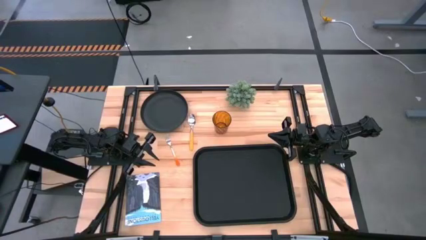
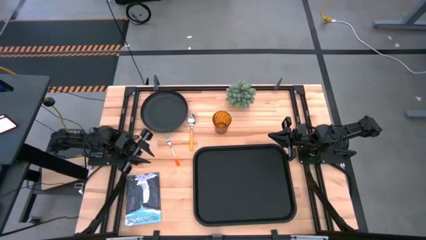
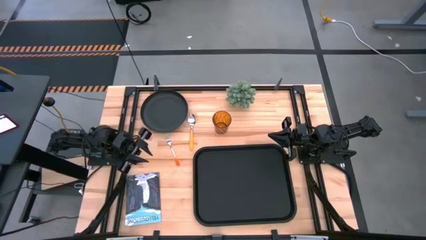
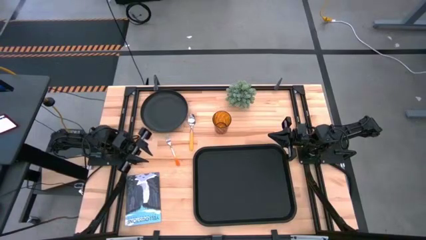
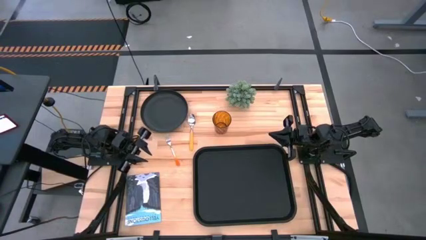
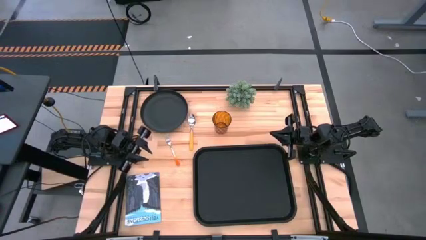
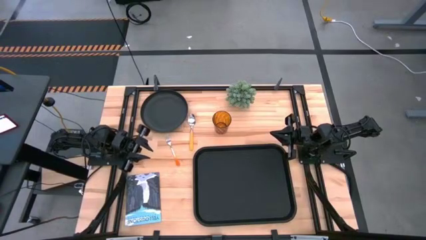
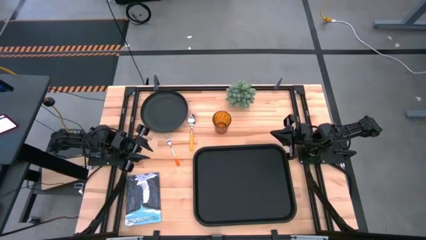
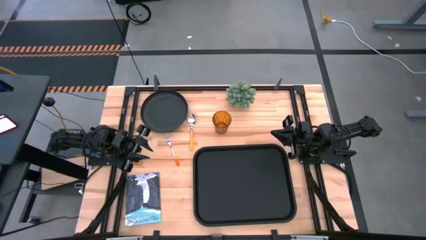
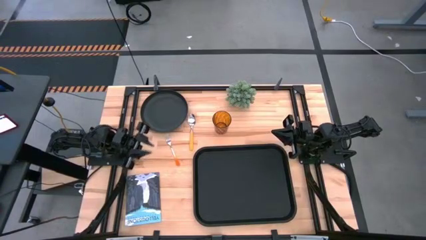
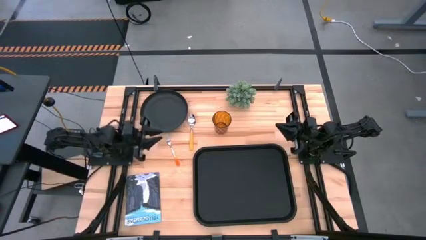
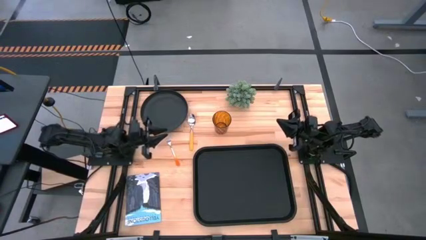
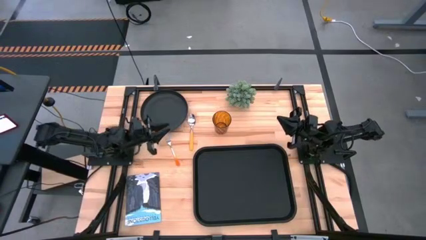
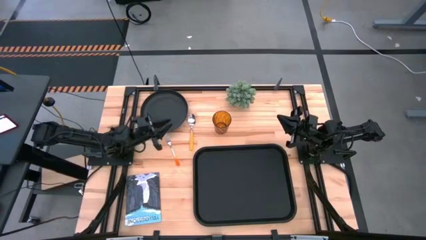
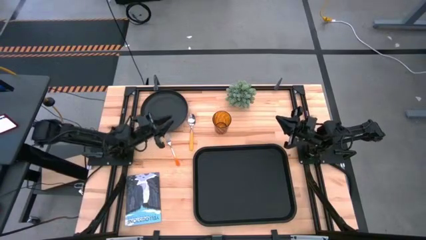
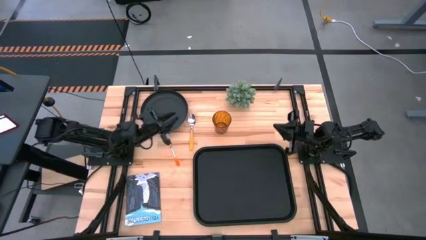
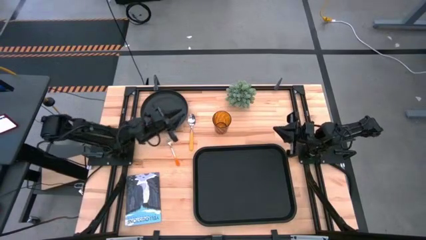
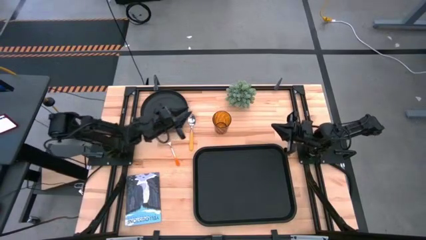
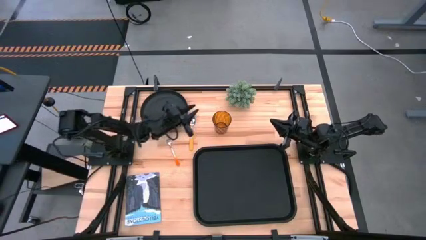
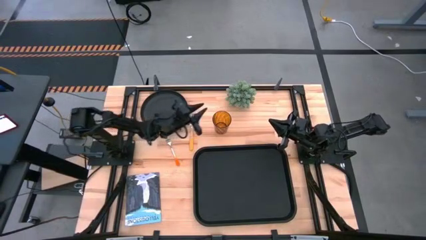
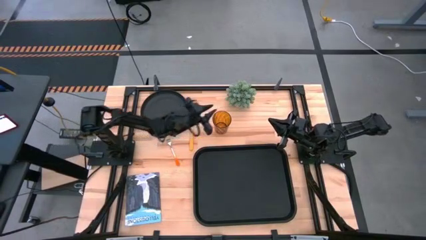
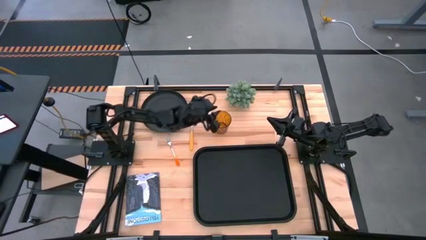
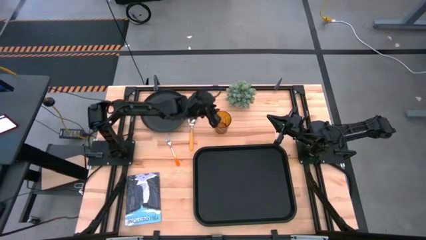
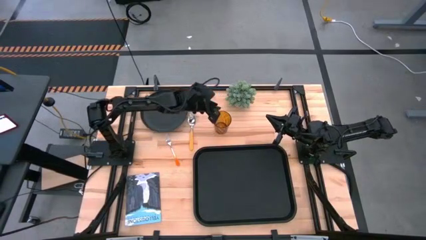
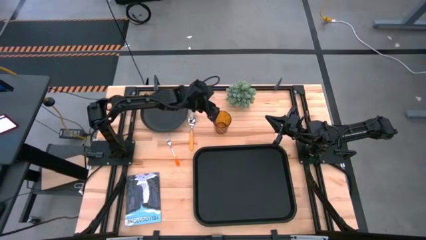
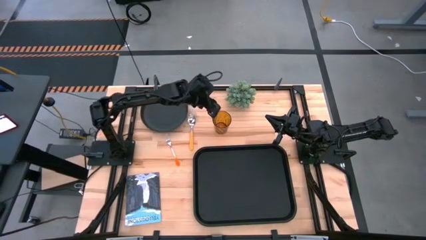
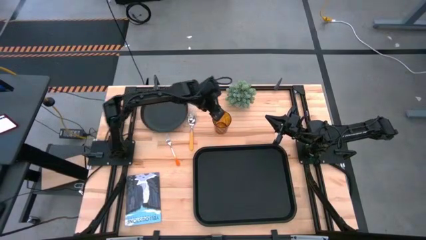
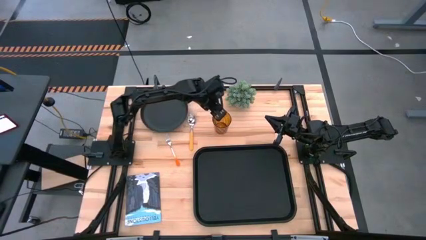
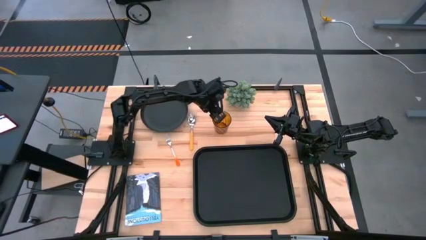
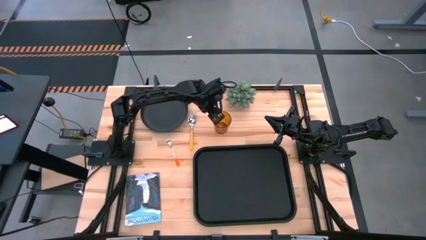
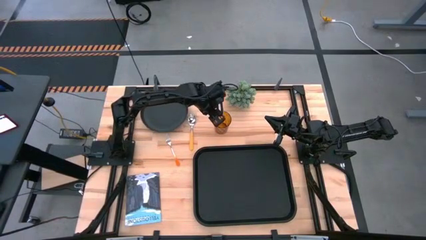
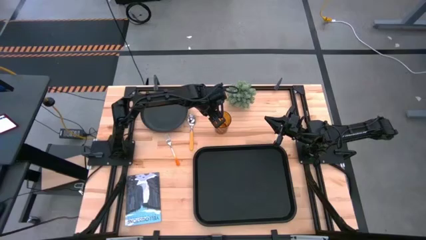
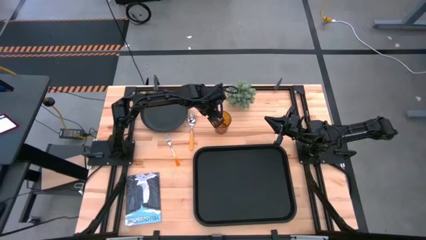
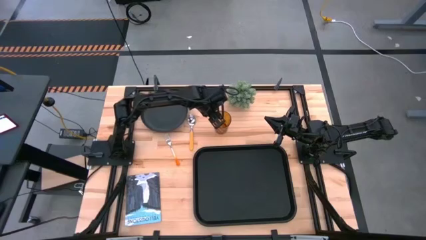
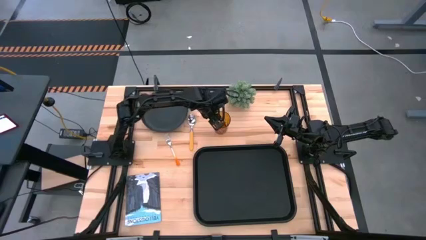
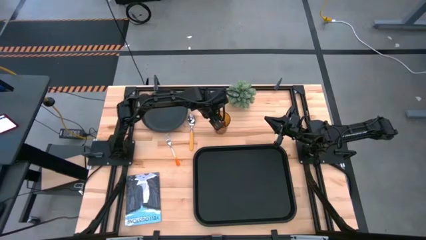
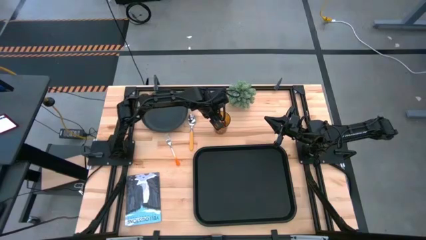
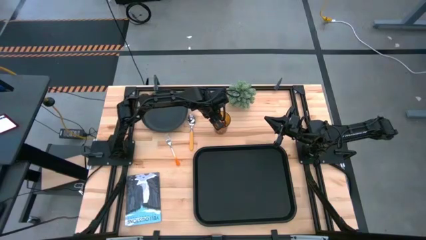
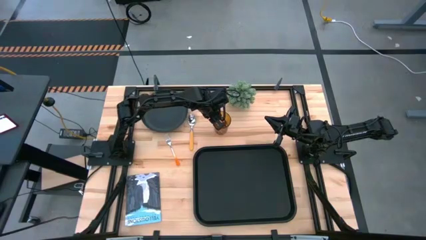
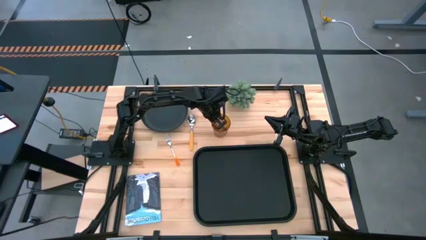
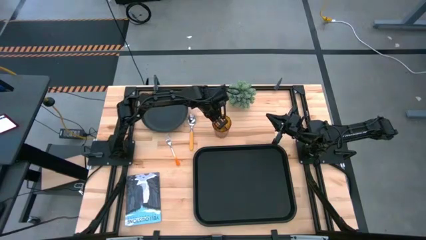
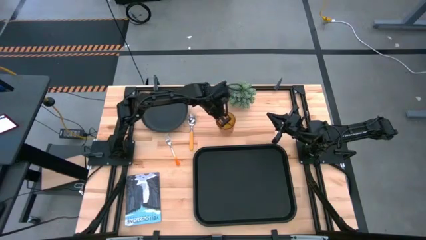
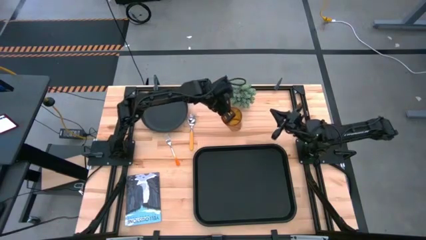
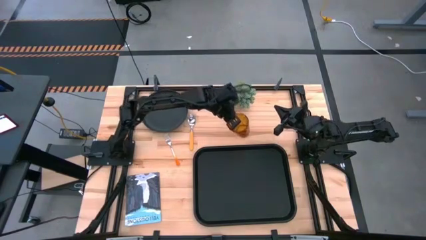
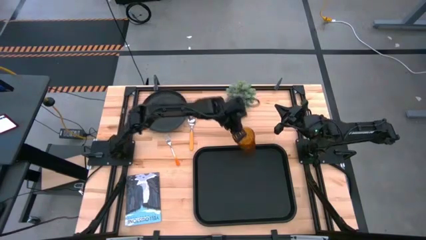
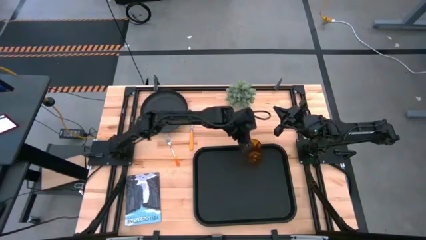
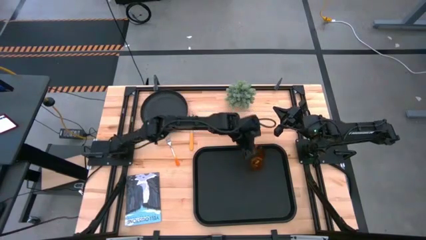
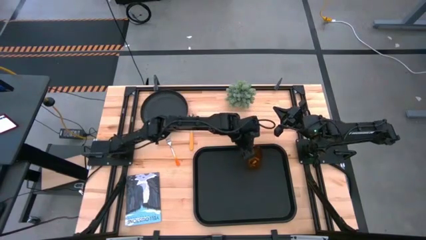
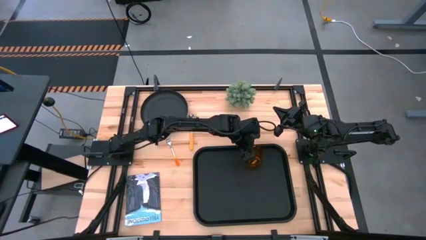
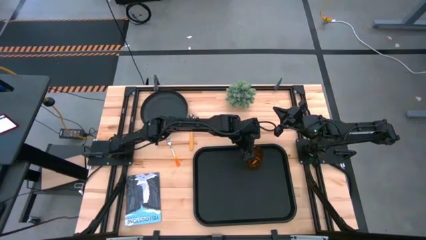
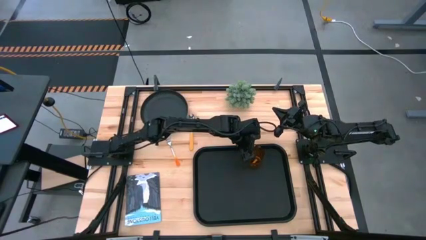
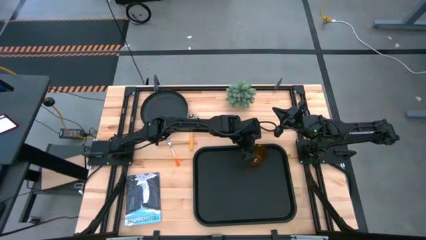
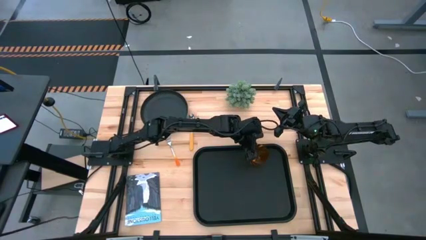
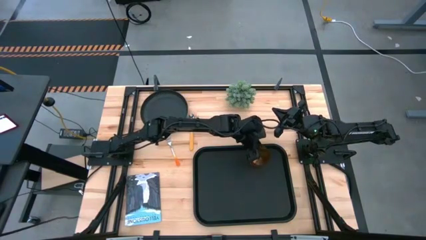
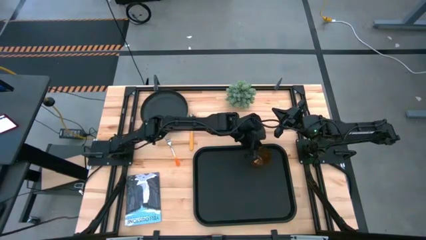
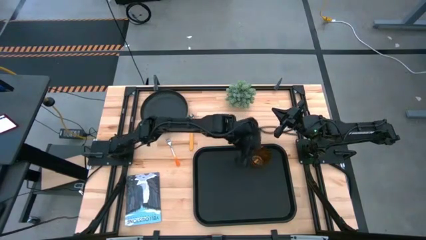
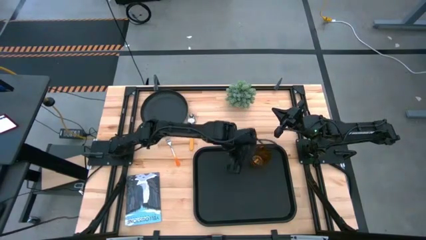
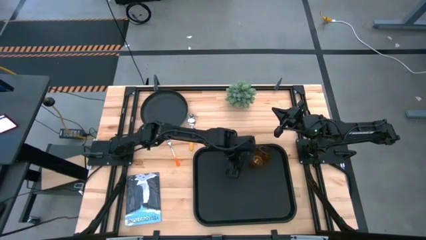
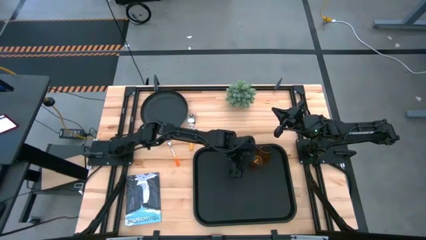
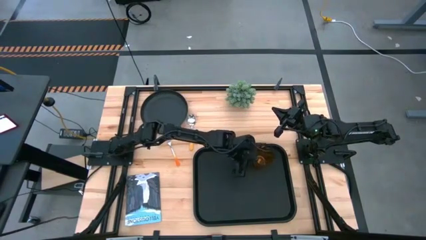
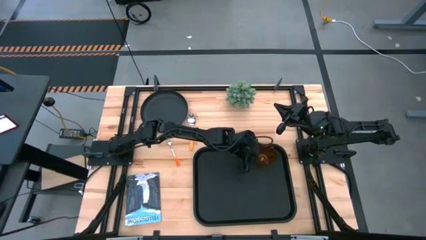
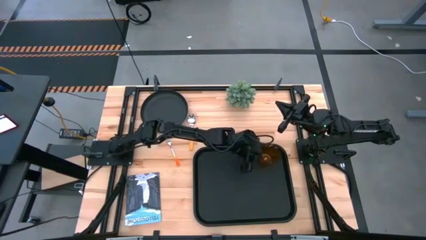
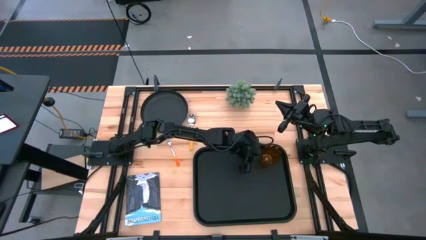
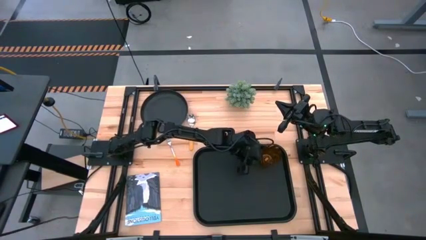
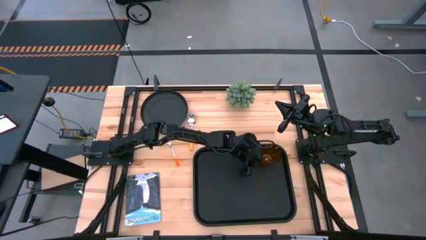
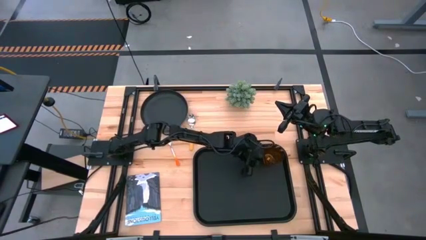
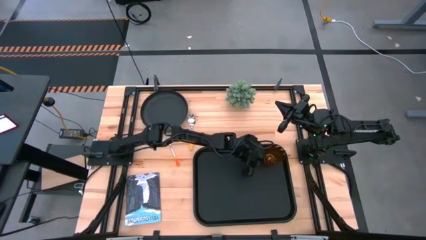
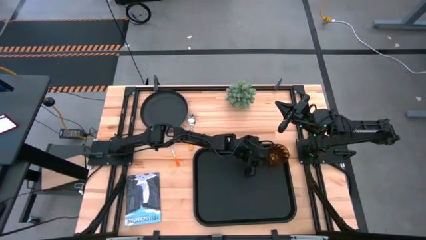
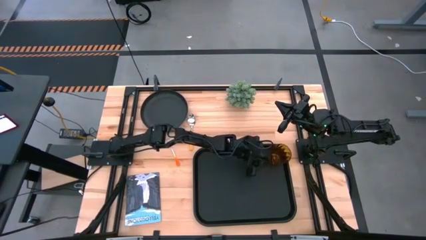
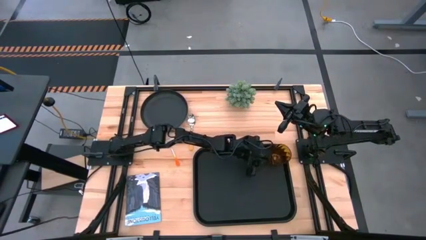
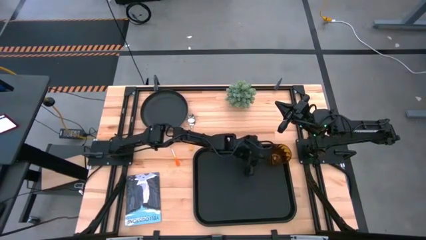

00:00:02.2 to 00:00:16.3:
Task: Pick and place plate/cup/fork/spoon on tray
Put the brown glass cup on the black serving tray
